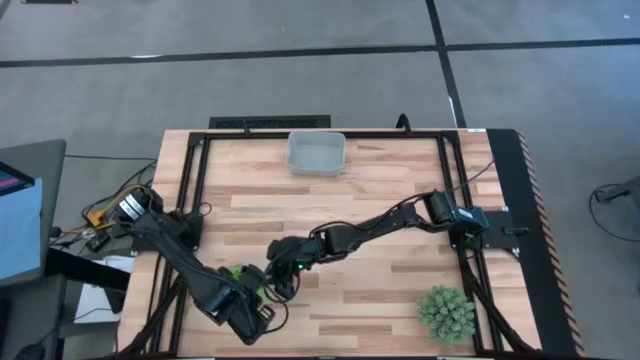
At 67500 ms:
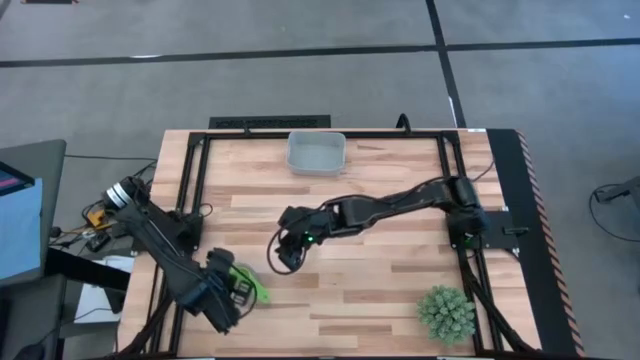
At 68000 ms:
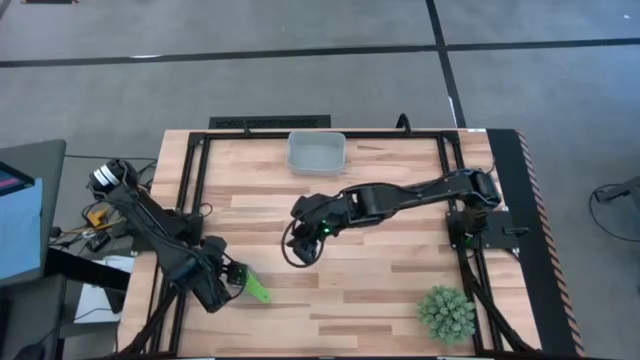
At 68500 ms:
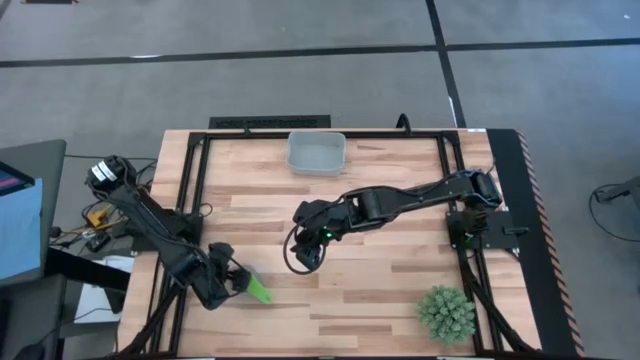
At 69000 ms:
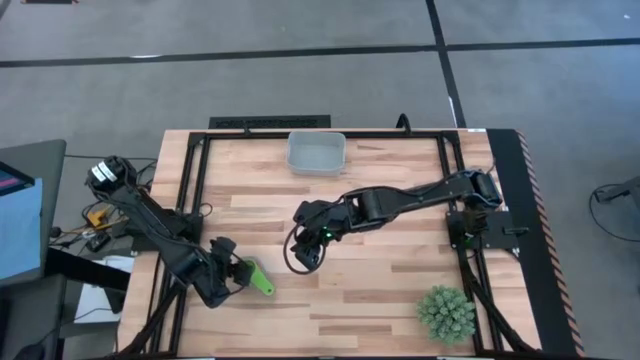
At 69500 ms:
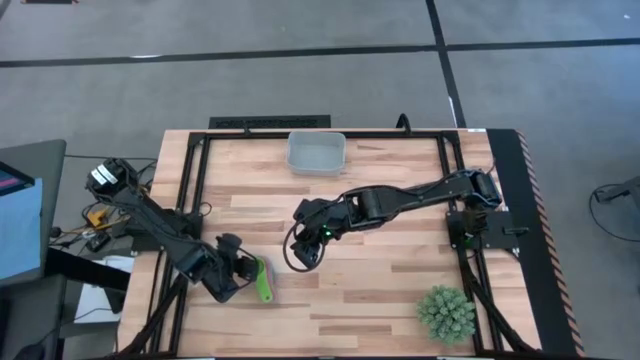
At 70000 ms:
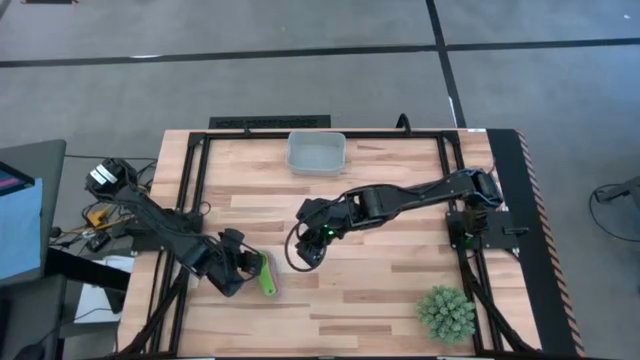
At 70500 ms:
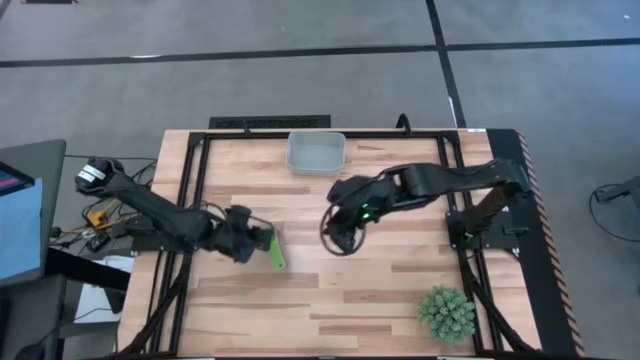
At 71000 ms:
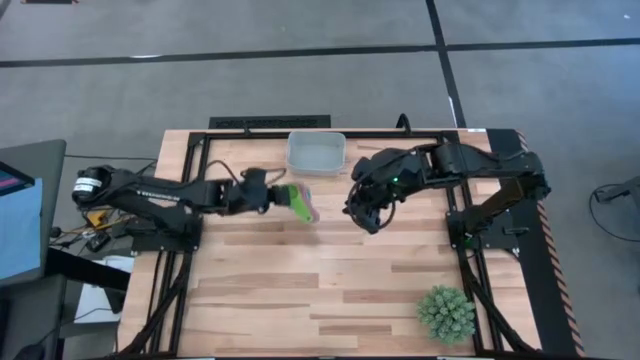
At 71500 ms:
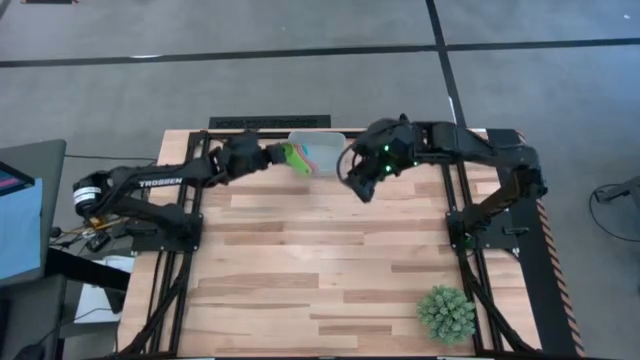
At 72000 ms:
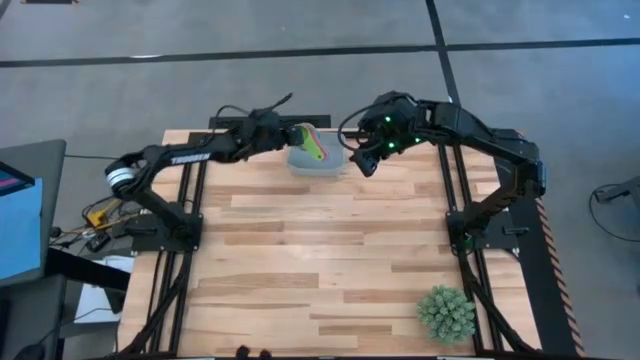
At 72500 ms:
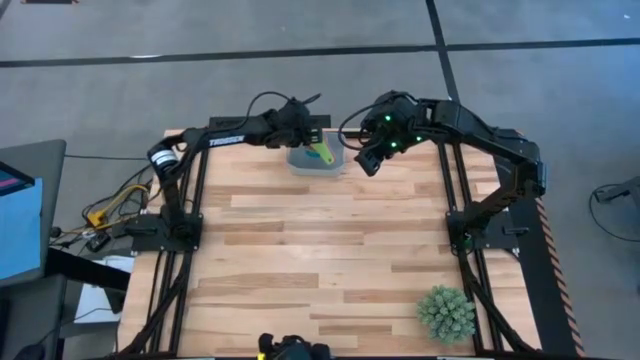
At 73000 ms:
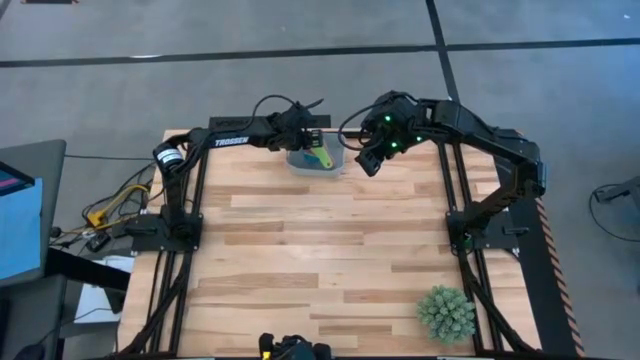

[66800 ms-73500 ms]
Task: Nest measuring cups in basket
Put the stacked measuring cups into the gray bin

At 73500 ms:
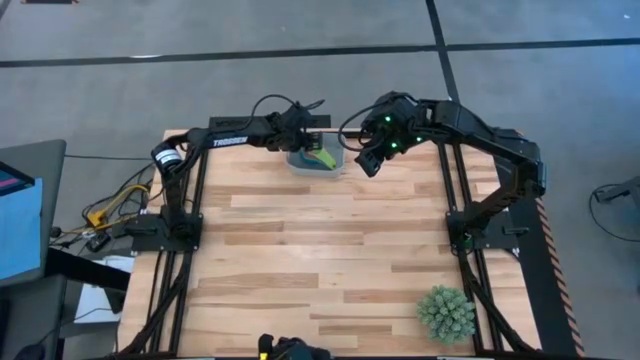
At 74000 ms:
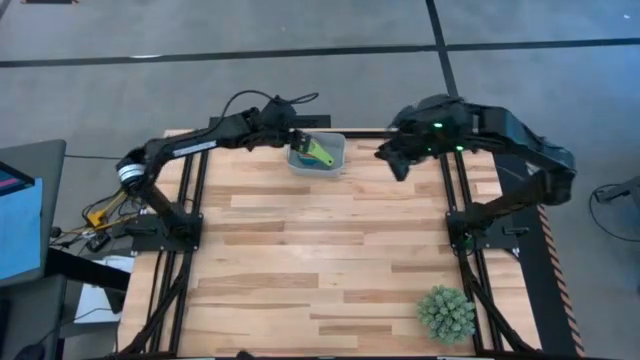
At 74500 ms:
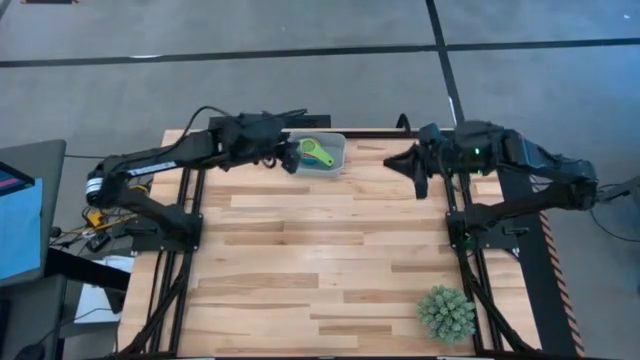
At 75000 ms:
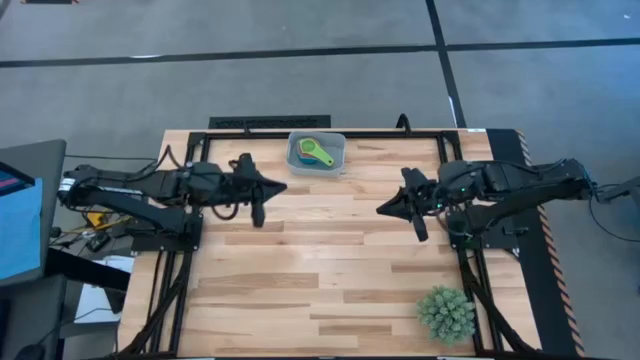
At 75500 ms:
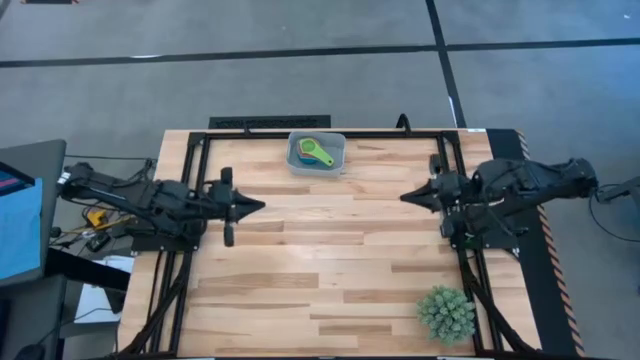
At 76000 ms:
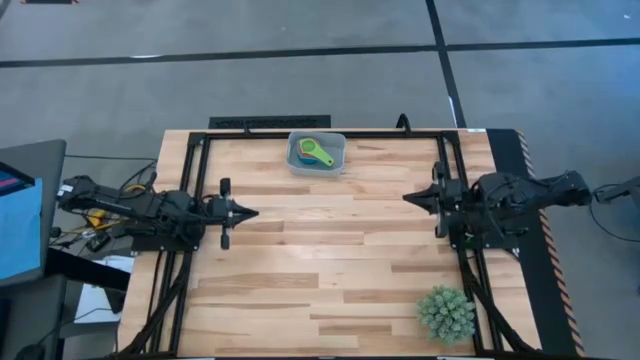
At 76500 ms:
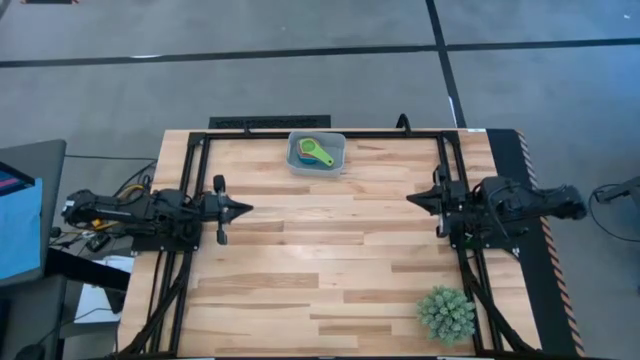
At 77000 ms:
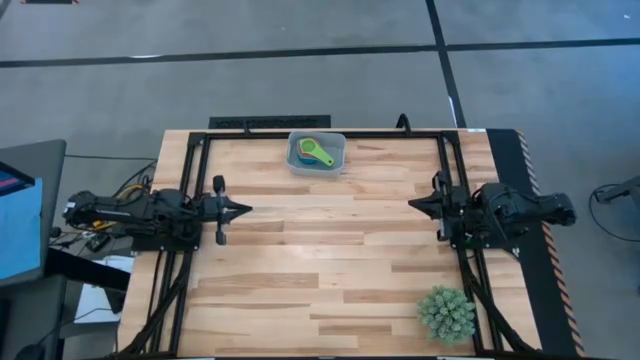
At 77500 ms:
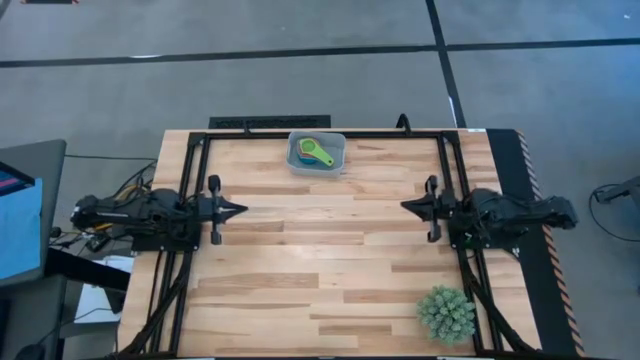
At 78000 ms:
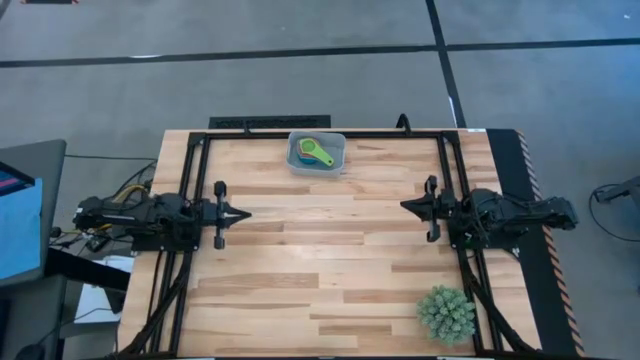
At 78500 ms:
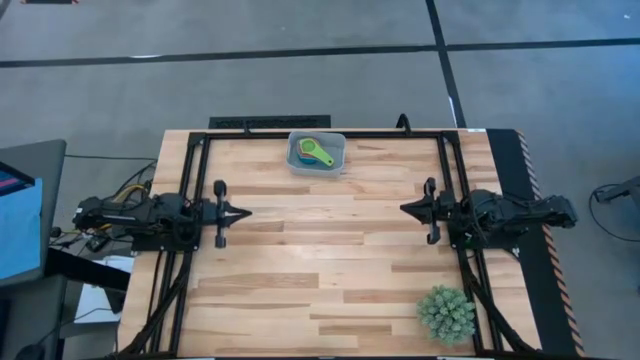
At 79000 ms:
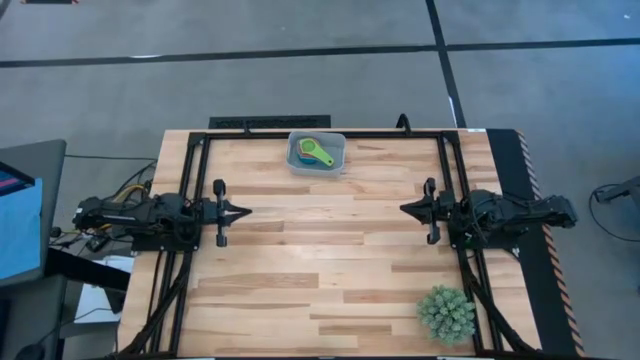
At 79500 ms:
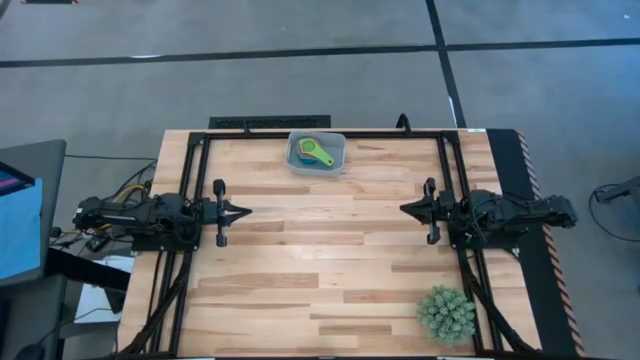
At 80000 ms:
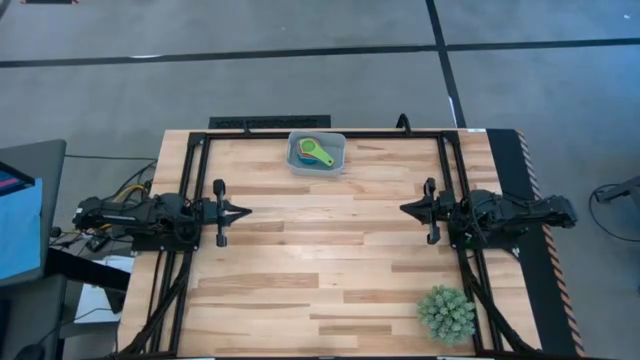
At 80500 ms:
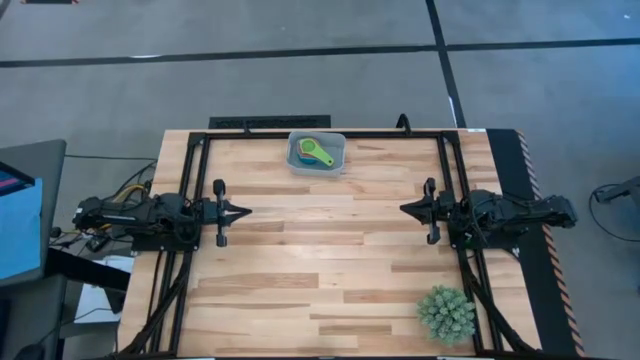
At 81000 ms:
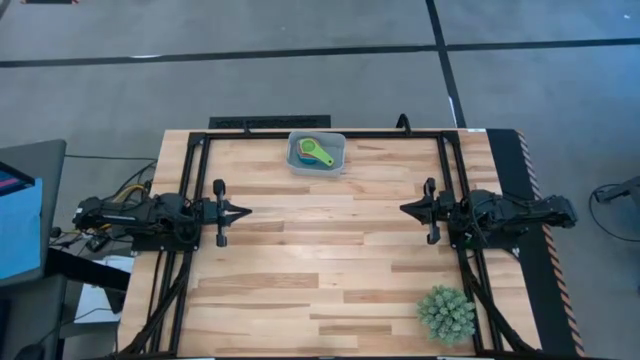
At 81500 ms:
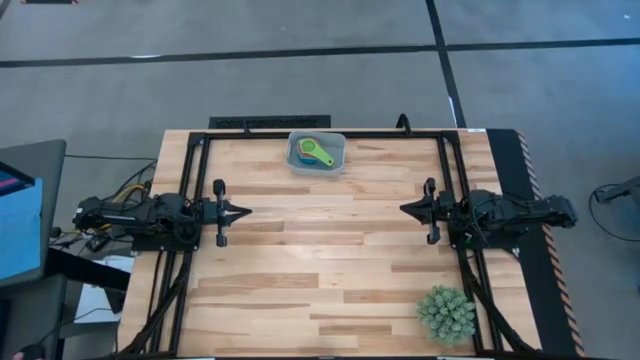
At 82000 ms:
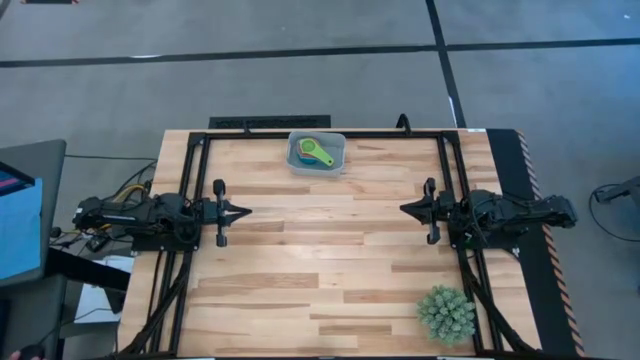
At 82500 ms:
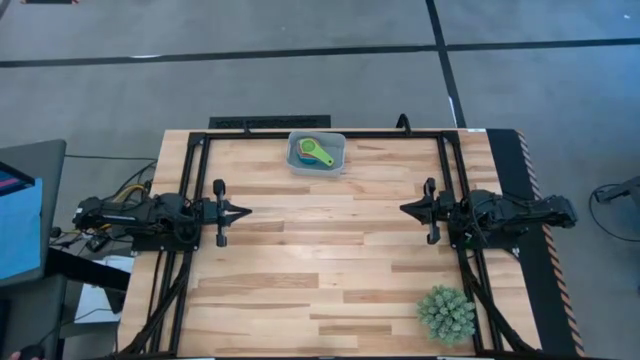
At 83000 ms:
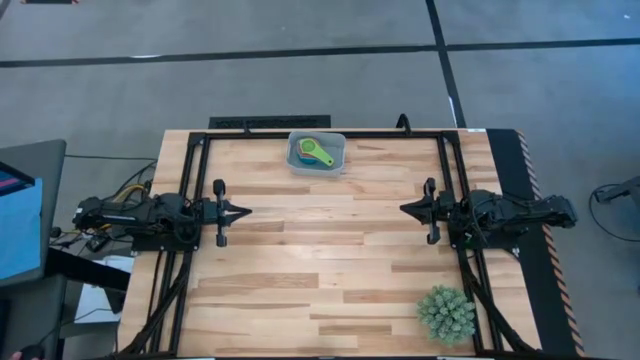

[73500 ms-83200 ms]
Return to Home Position

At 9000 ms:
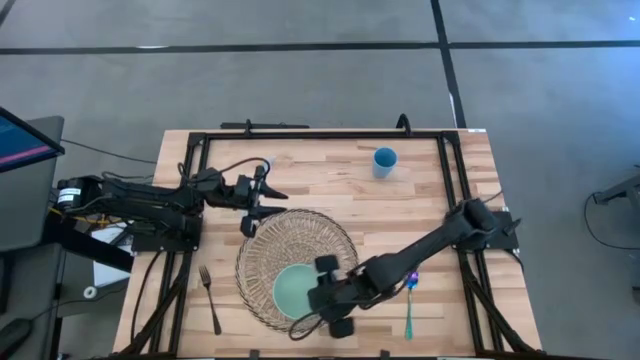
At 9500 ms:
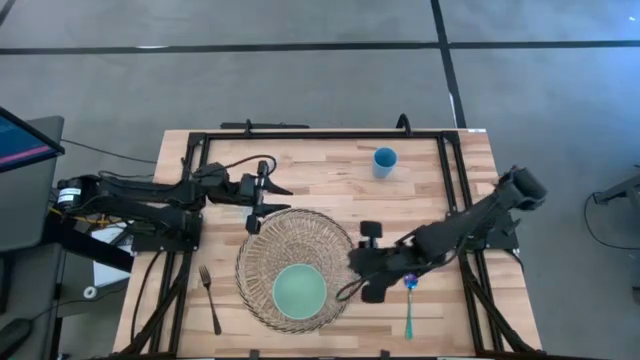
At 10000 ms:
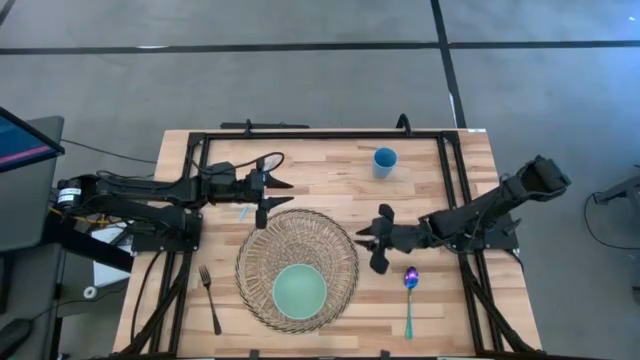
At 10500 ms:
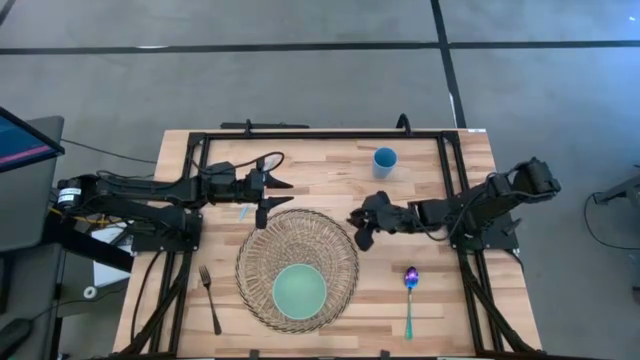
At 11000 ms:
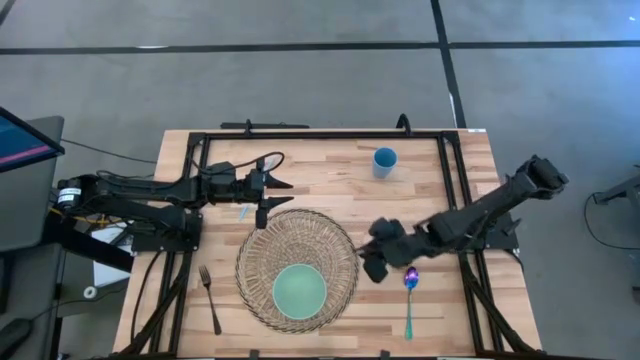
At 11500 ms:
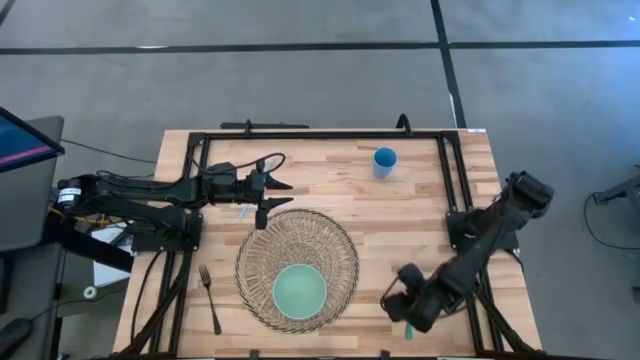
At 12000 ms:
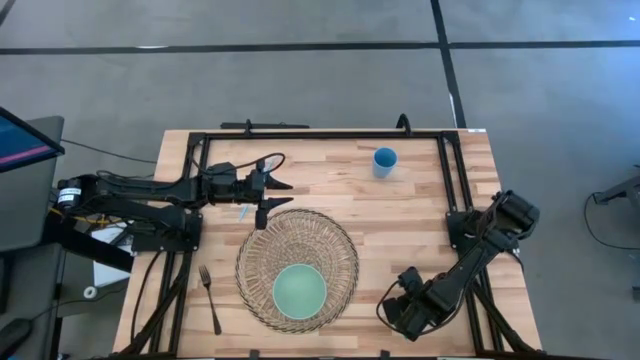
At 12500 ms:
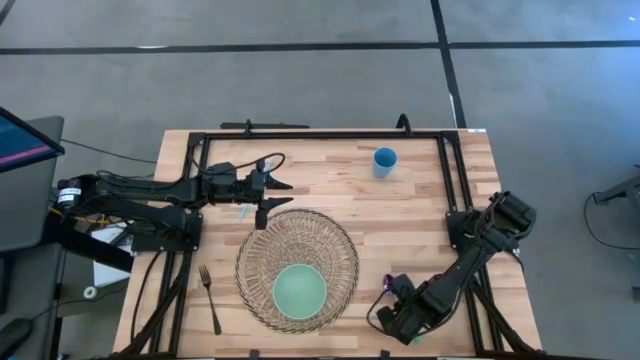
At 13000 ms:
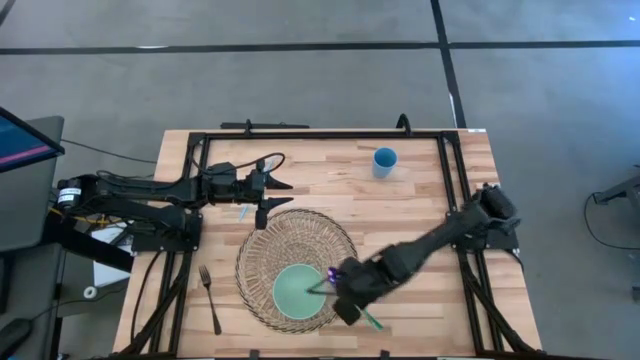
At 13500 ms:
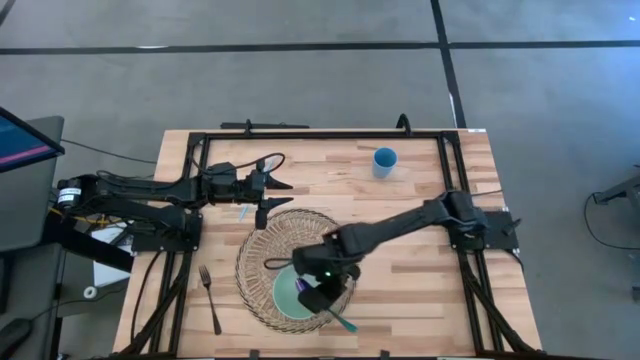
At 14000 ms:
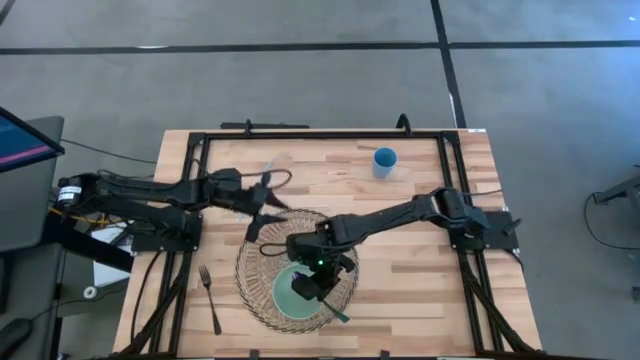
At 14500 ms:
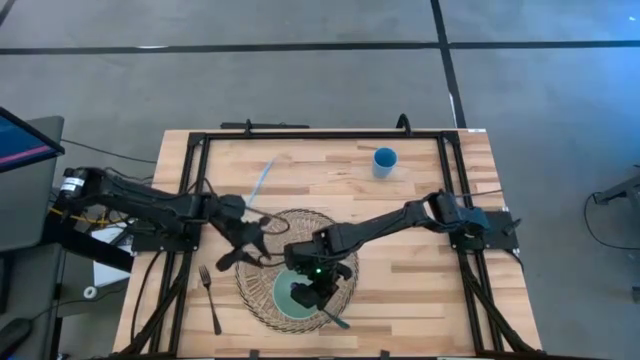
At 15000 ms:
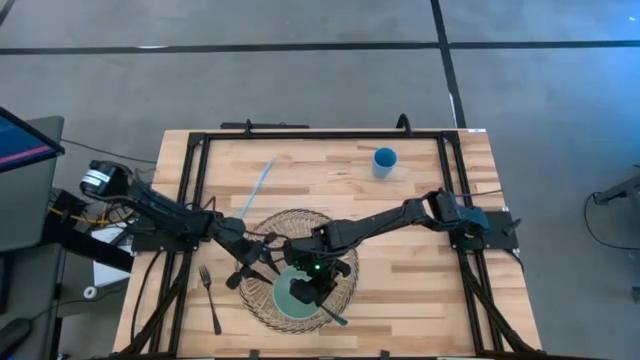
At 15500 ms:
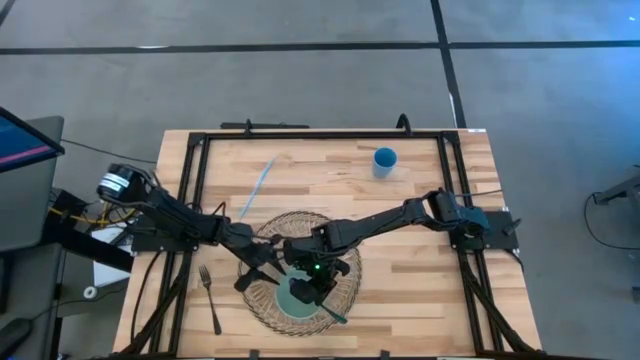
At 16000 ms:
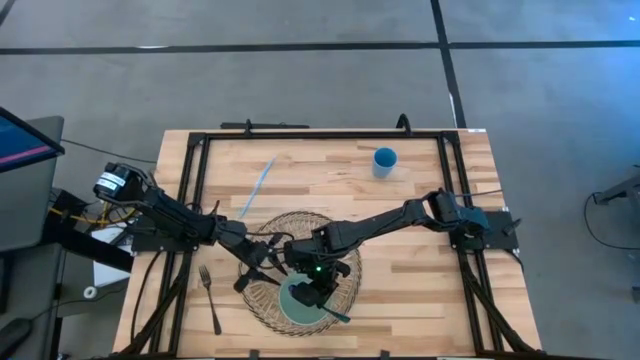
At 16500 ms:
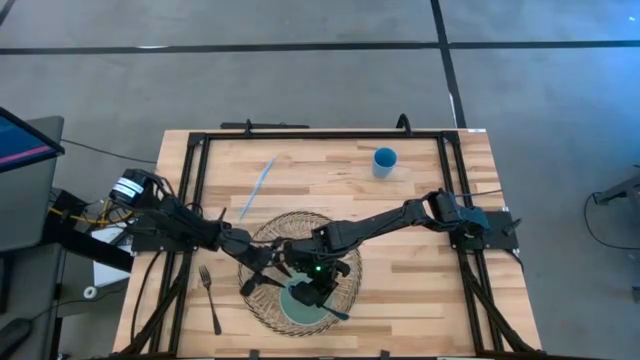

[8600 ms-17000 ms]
Task: Pick & Place Utensil
Put the blue spoon into the light blue bowl
